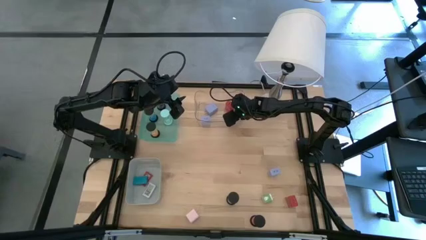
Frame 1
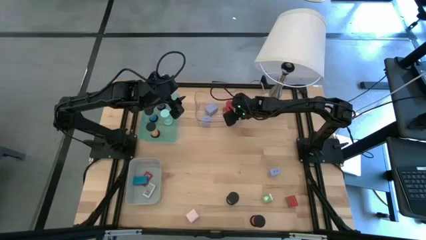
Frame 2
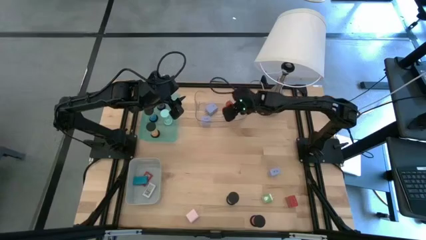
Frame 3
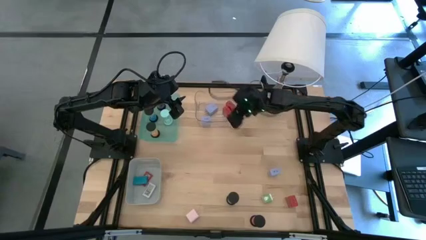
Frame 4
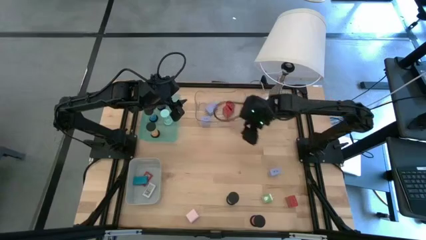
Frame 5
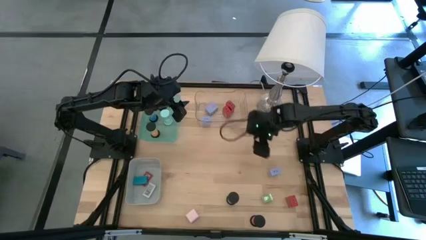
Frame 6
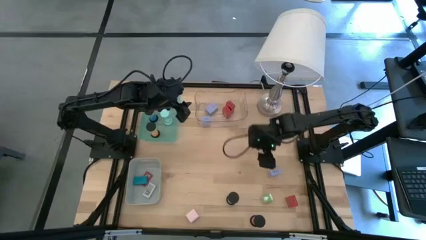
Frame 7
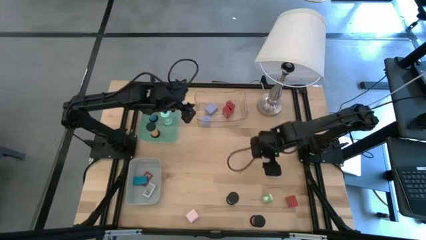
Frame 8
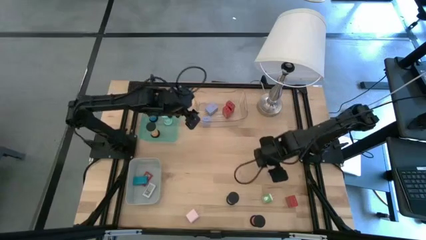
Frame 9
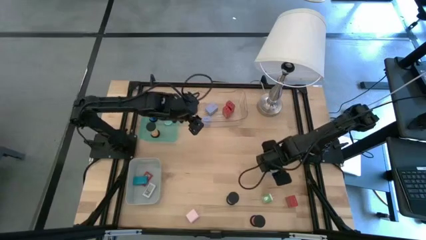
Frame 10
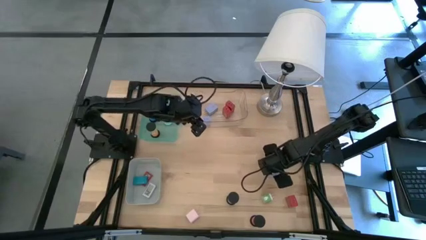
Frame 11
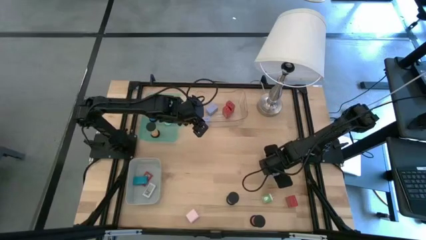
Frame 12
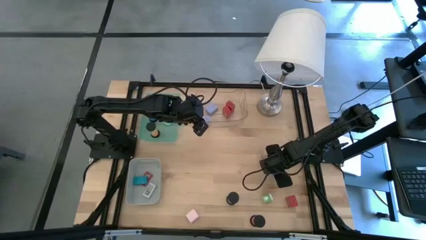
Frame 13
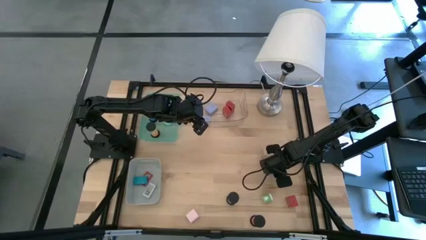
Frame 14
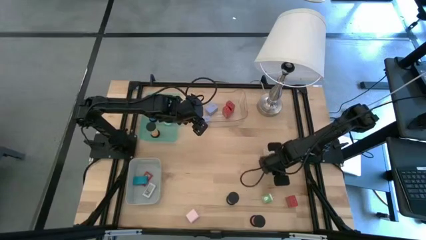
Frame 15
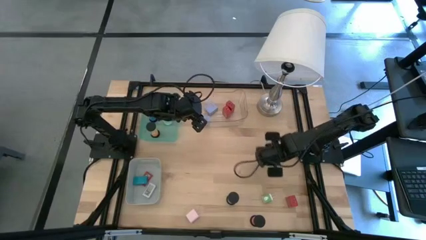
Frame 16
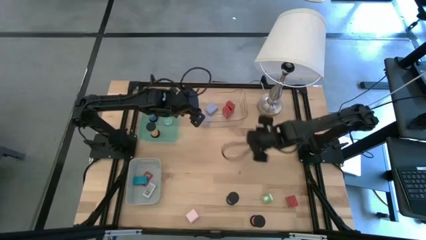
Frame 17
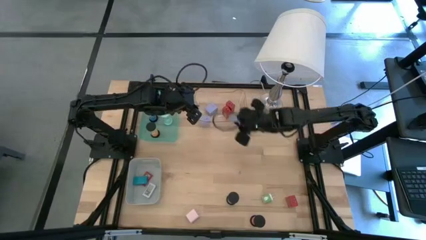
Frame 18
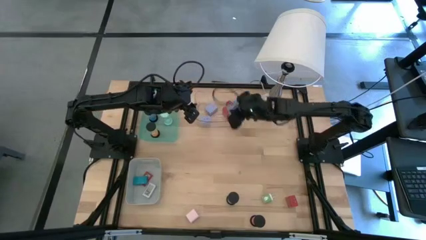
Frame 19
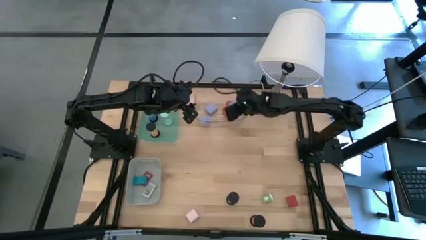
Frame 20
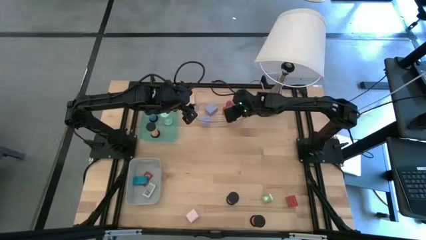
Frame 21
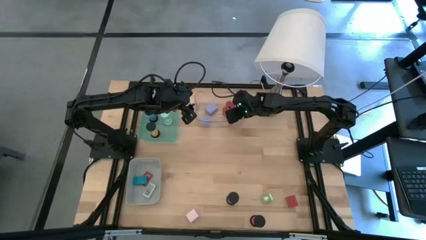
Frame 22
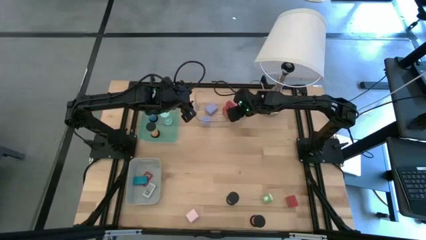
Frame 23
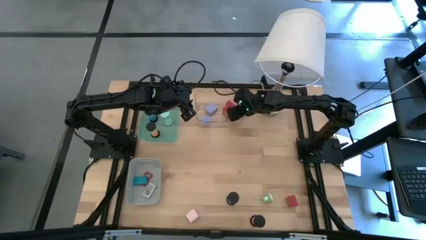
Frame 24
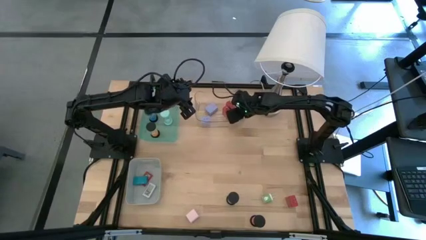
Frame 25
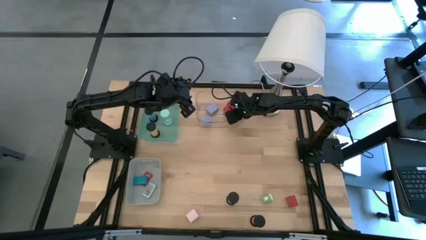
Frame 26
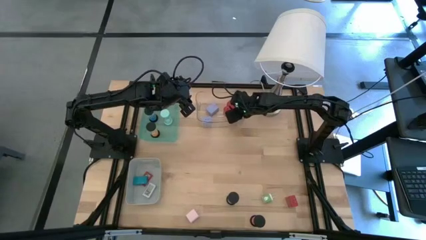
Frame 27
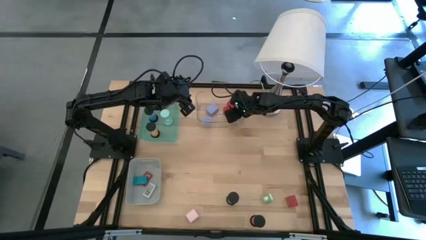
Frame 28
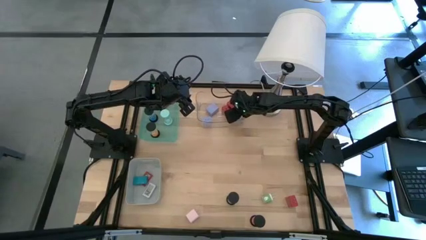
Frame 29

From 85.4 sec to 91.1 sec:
Task: Pick & Place Office items
Put the blue charger adapter into the transparent bin

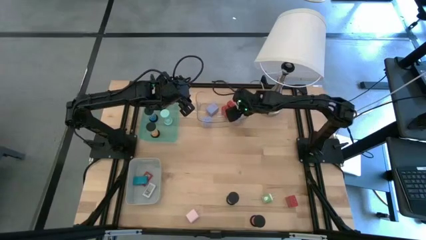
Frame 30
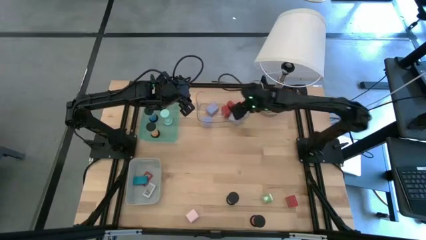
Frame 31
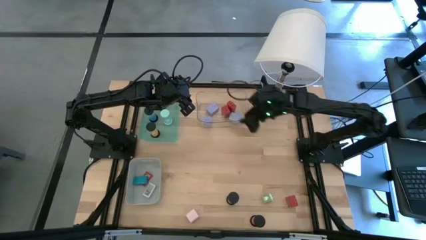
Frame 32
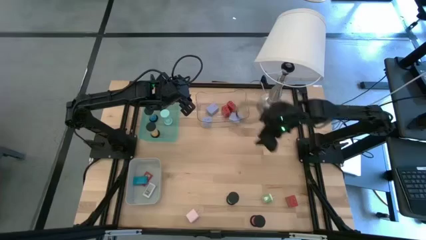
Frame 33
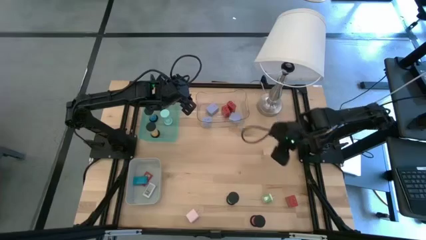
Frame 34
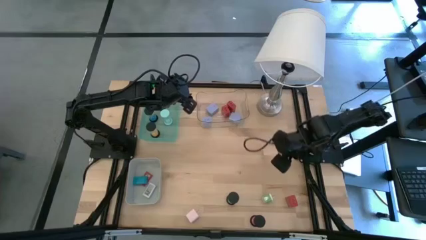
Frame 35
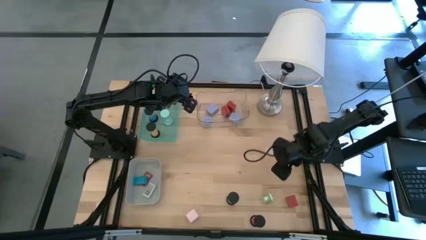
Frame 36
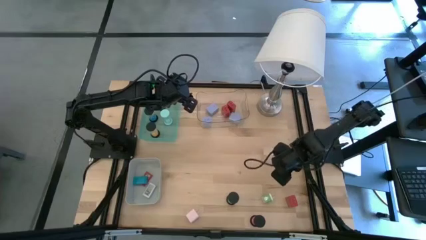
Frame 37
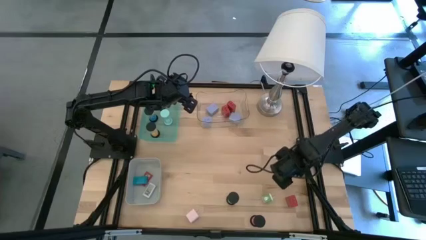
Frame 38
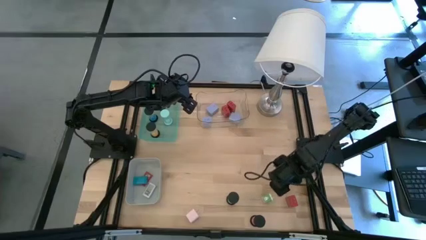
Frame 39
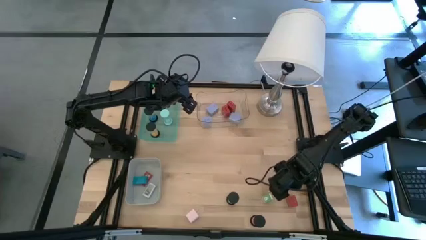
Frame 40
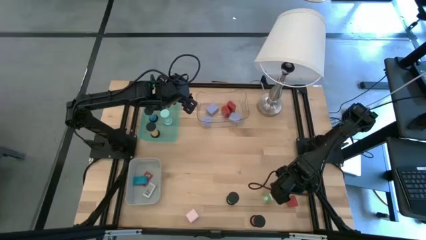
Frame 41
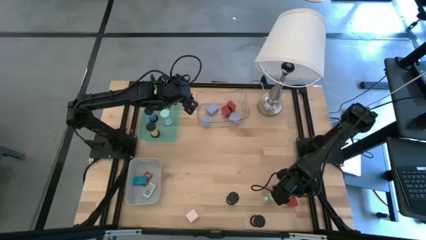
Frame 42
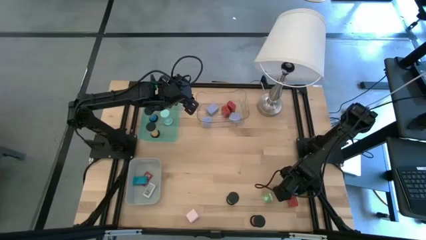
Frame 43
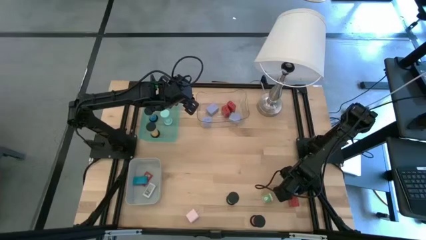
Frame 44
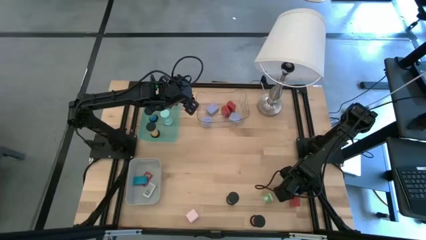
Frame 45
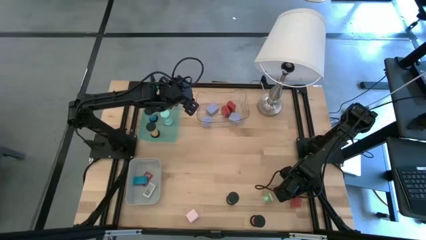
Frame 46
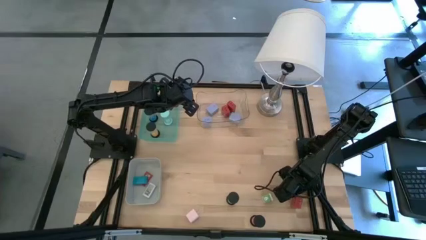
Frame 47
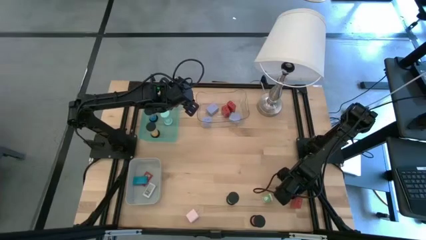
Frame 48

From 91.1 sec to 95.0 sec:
Put the red charger adapter into the transparent bin

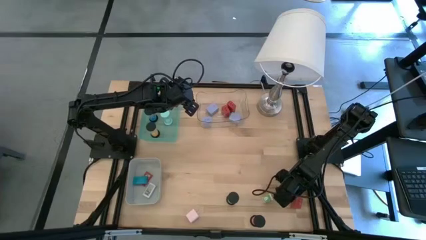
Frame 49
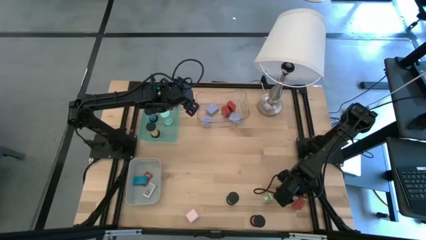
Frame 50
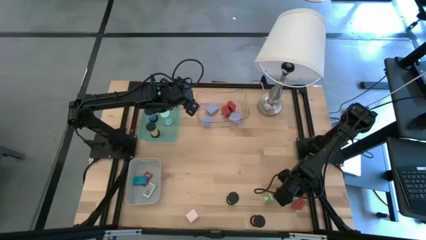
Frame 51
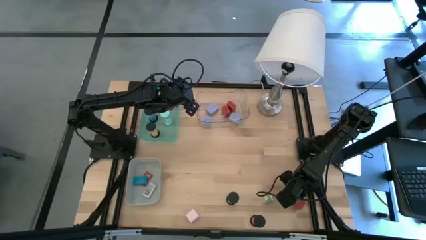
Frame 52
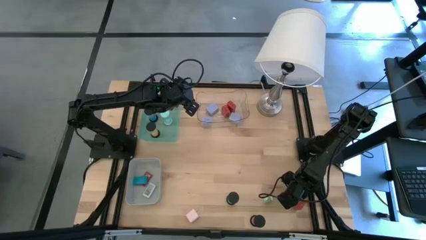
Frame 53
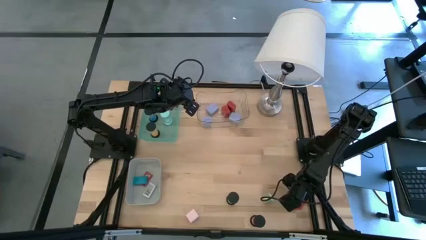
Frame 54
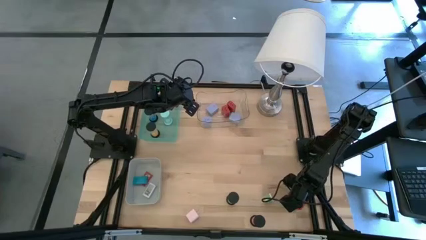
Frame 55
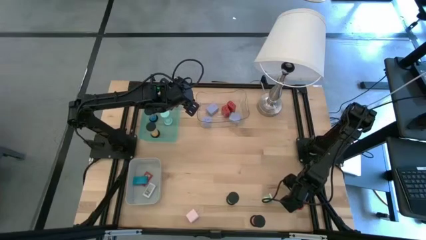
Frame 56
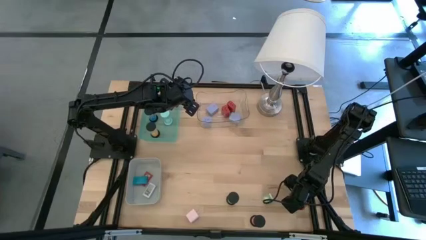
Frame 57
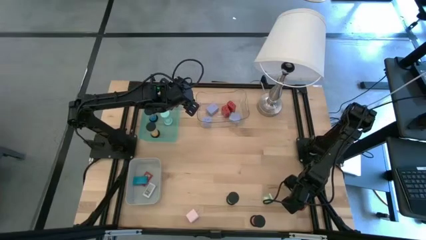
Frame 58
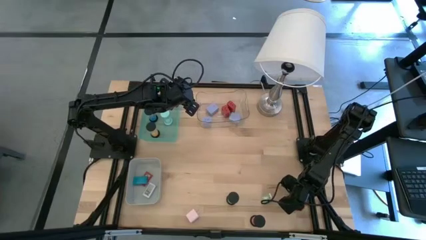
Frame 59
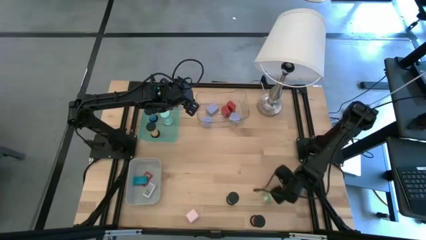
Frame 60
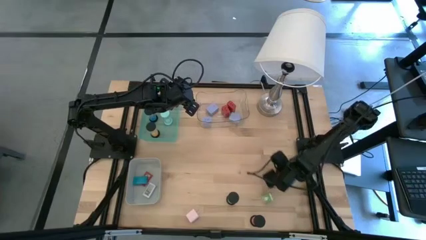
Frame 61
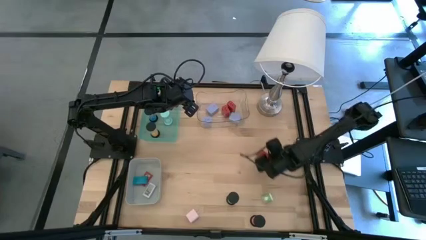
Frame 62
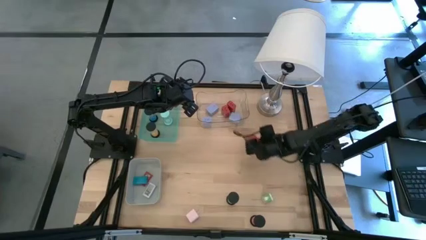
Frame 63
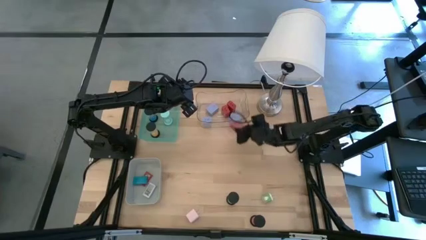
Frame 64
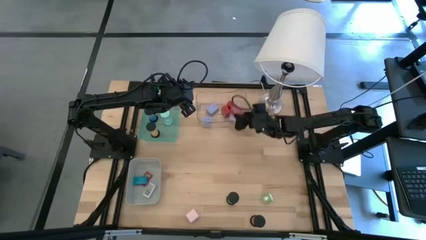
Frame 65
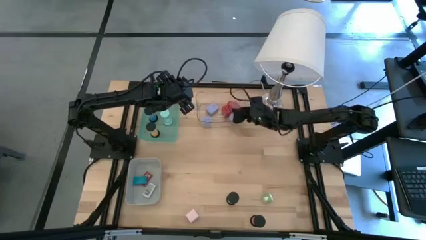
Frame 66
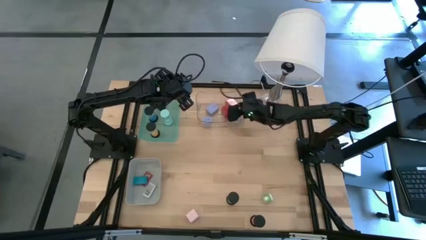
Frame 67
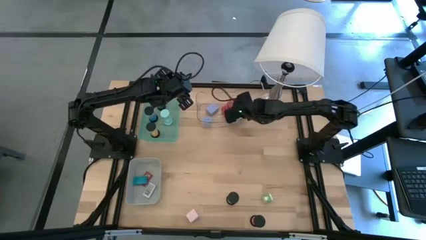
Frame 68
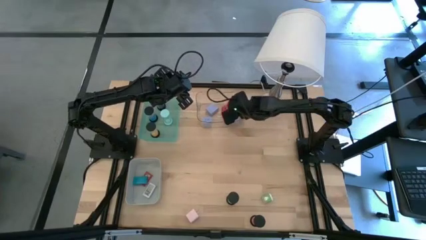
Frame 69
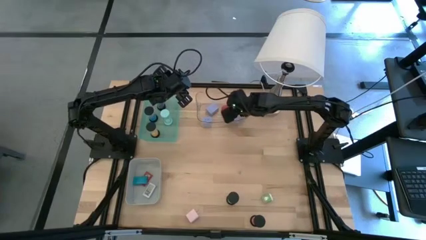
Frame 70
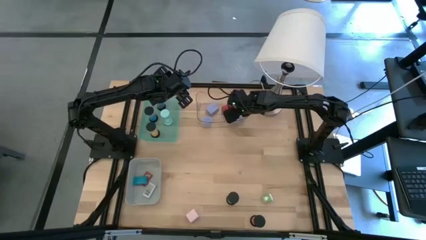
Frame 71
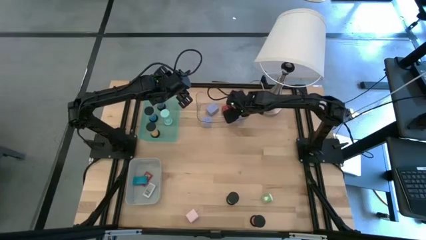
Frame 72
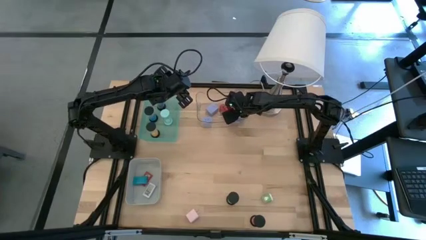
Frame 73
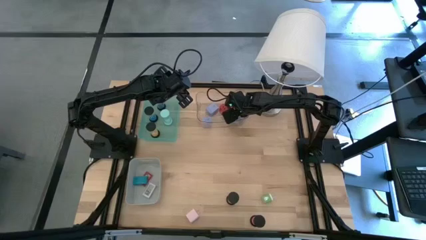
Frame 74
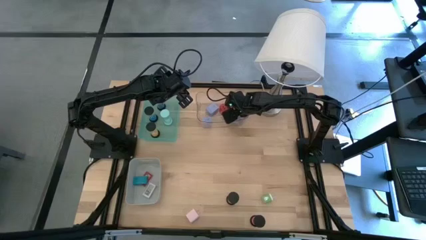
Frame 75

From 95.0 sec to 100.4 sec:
Put the red charger adapter into the transparent bin

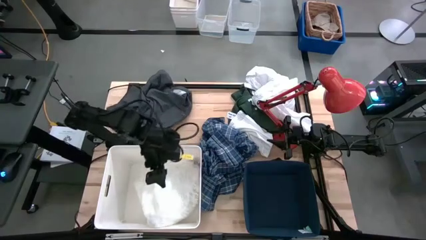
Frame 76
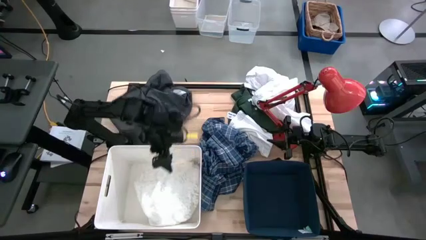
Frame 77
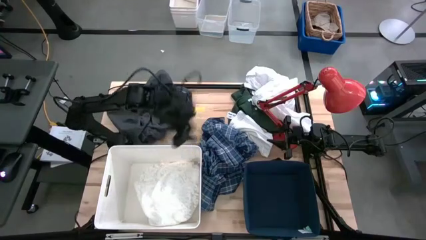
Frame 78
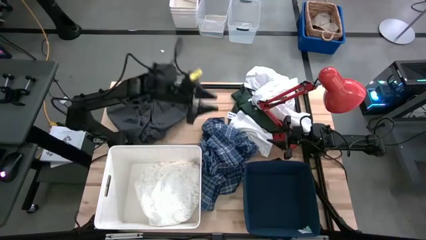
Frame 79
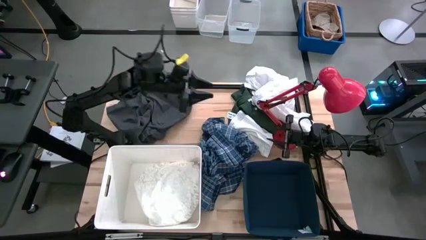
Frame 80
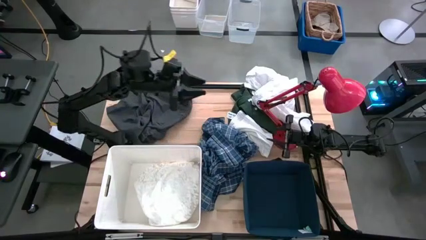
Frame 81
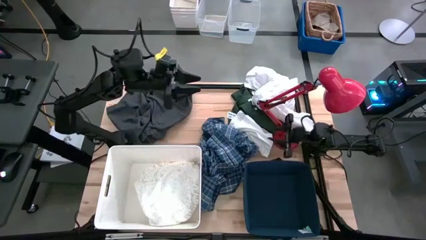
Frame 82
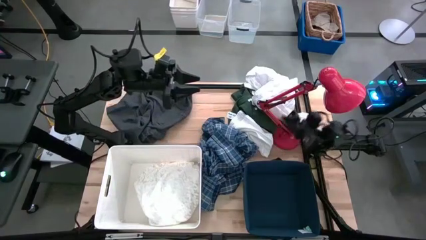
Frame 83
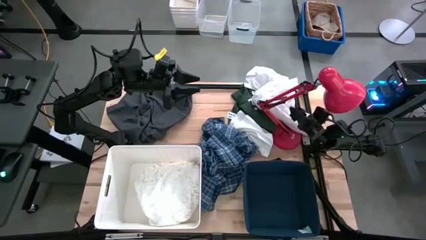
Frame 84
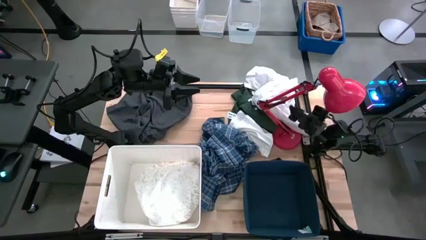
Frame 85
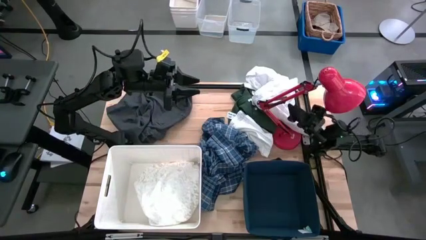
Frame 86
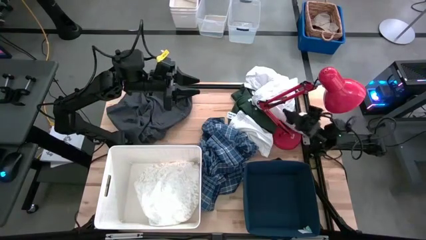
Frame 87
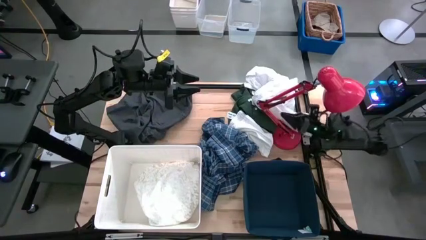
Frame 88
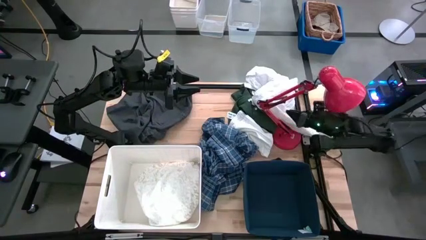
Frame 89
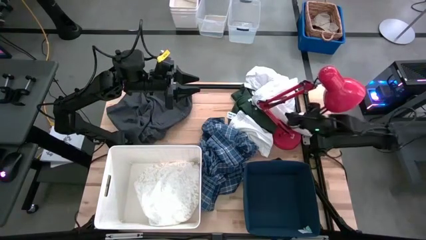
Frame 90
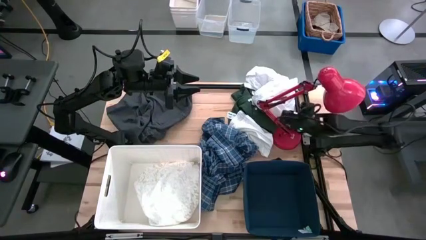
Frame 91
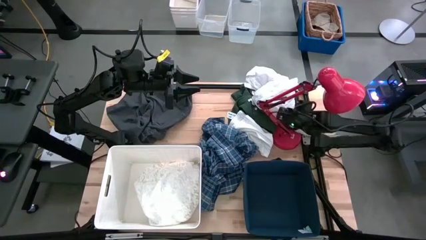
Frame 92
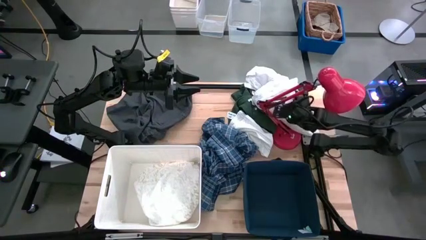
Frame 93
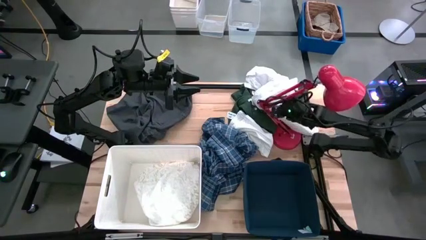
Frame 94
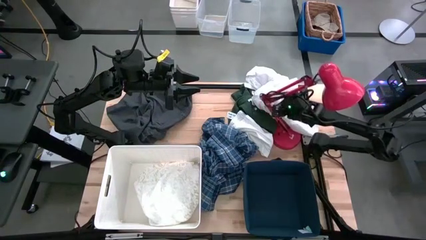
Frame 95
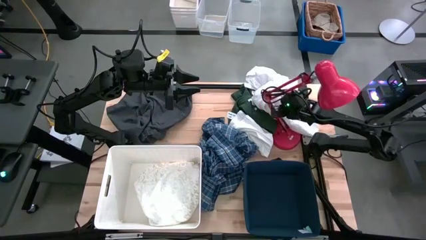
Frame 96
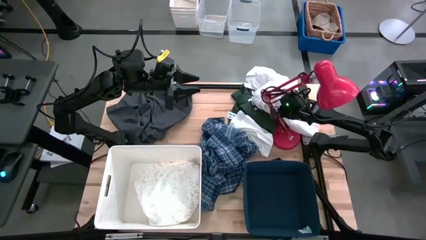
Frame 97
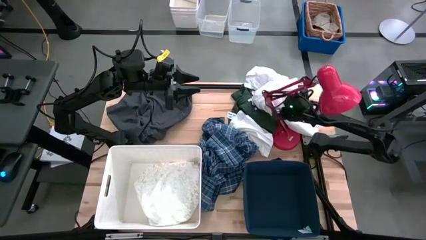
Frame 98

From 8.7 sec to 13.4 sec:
Task: Sort clothes
Put the white dress into the white bin
